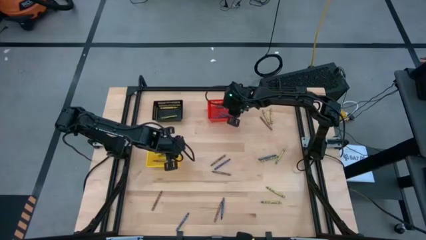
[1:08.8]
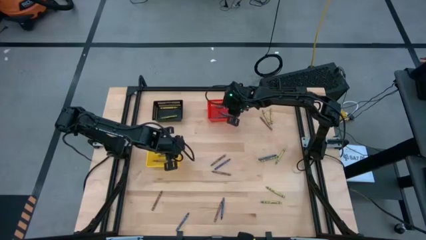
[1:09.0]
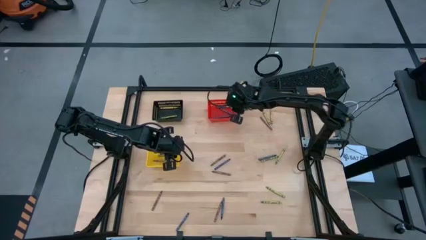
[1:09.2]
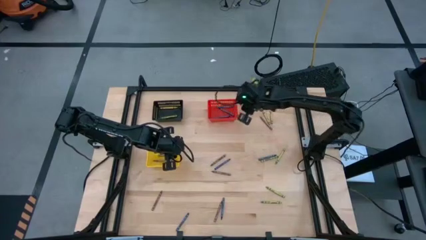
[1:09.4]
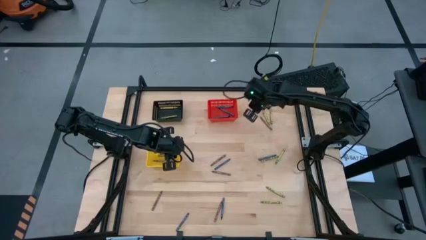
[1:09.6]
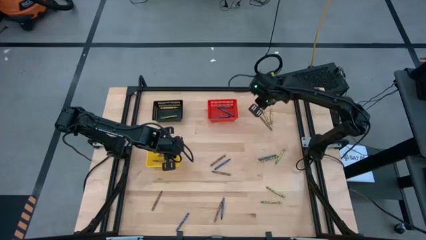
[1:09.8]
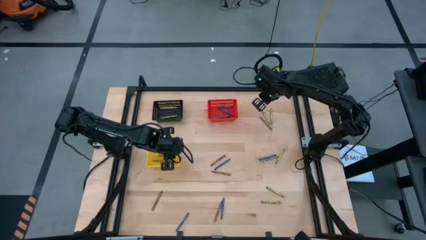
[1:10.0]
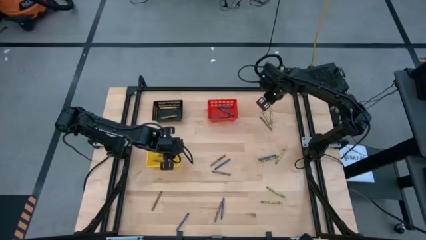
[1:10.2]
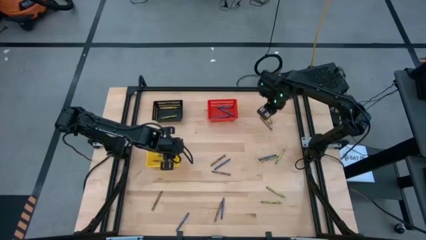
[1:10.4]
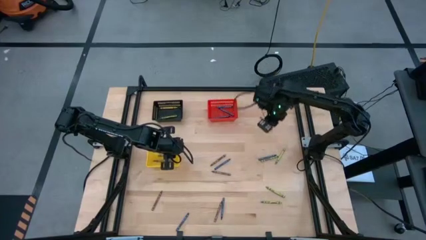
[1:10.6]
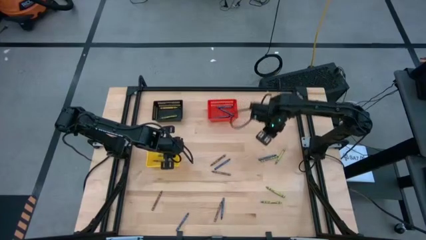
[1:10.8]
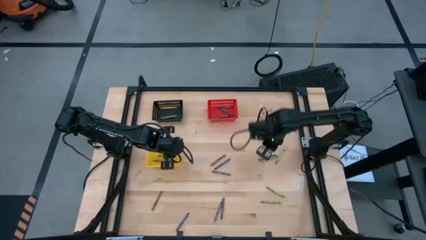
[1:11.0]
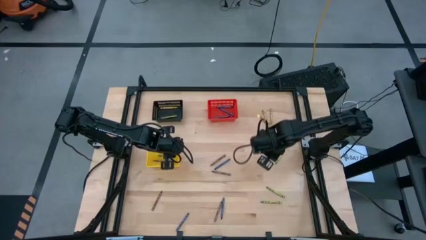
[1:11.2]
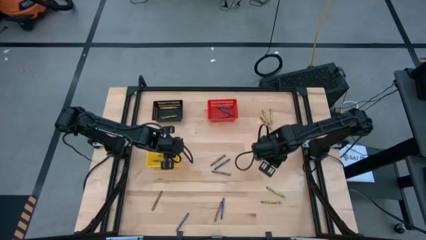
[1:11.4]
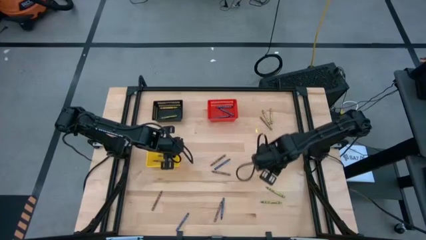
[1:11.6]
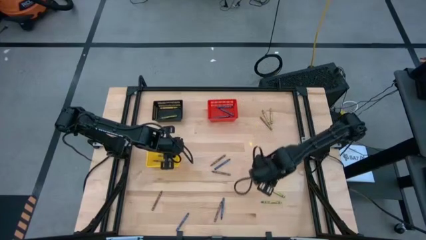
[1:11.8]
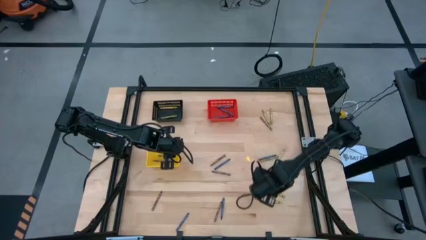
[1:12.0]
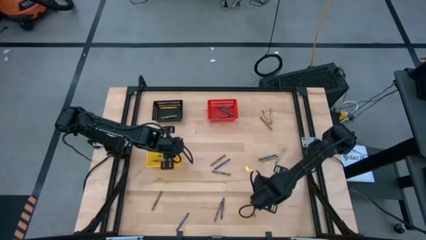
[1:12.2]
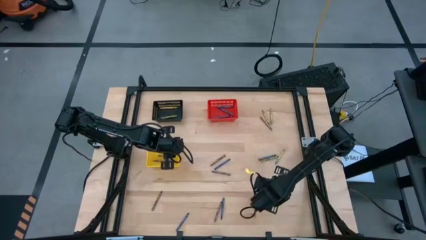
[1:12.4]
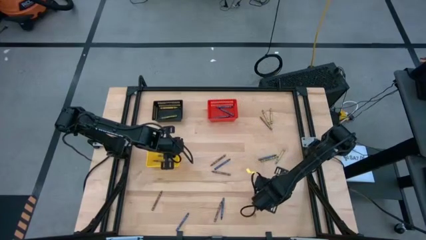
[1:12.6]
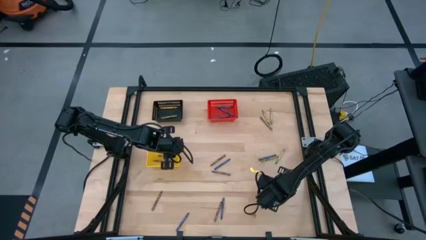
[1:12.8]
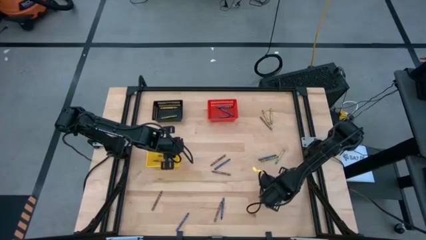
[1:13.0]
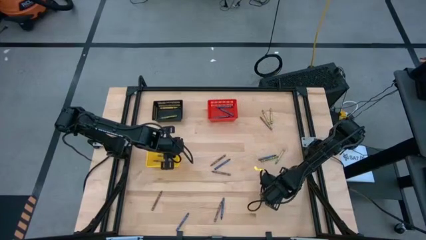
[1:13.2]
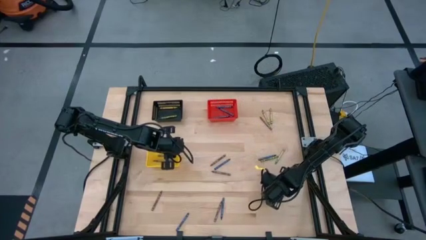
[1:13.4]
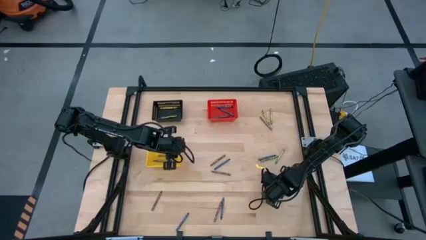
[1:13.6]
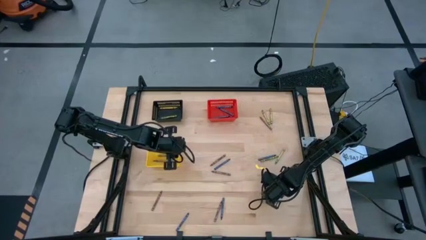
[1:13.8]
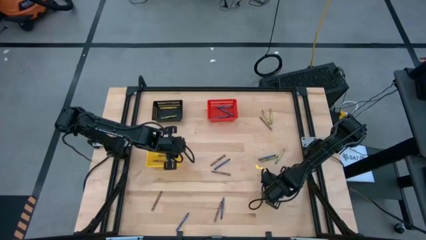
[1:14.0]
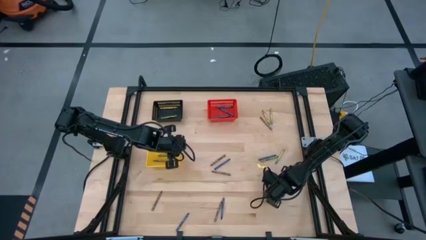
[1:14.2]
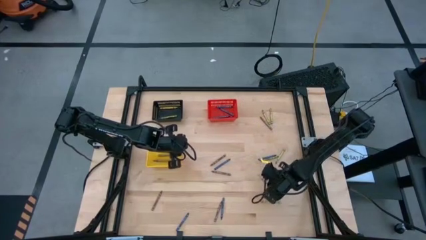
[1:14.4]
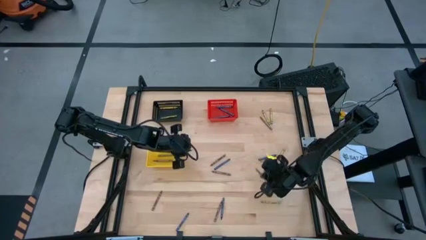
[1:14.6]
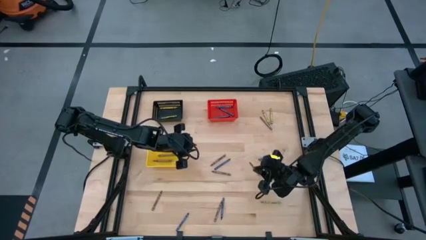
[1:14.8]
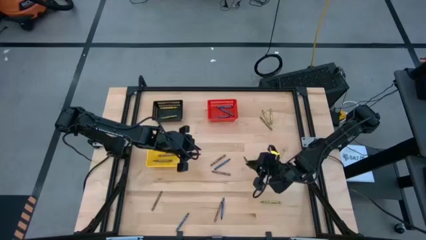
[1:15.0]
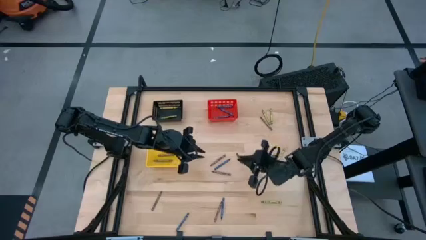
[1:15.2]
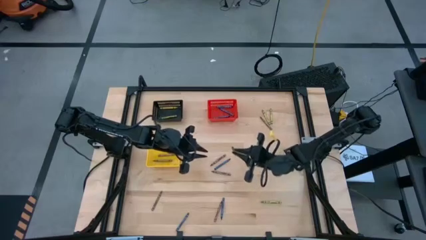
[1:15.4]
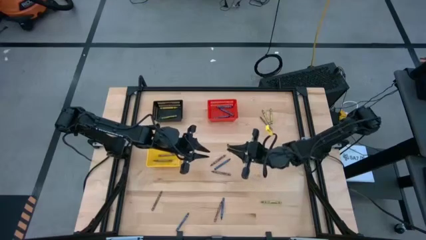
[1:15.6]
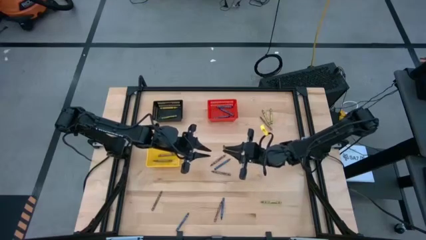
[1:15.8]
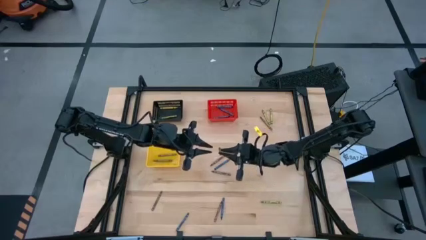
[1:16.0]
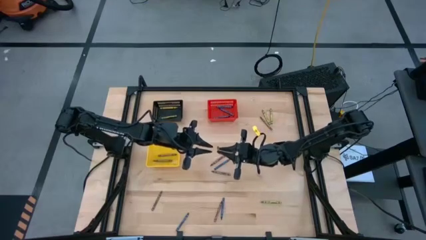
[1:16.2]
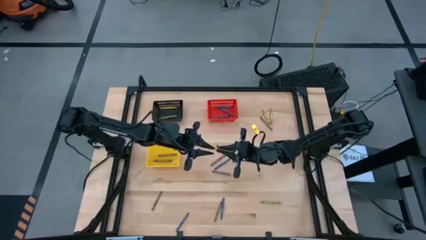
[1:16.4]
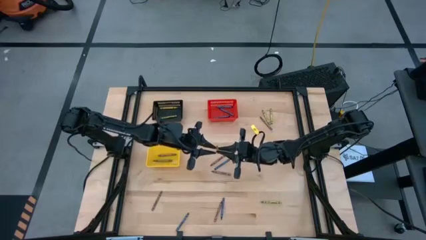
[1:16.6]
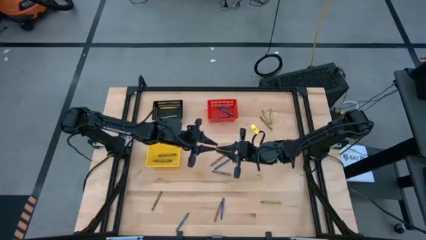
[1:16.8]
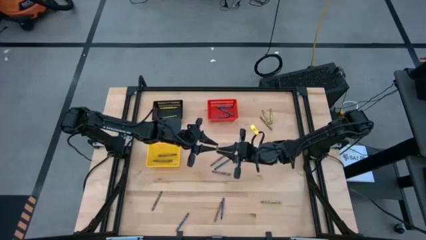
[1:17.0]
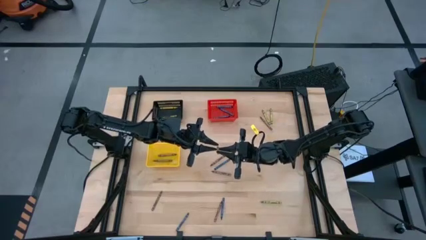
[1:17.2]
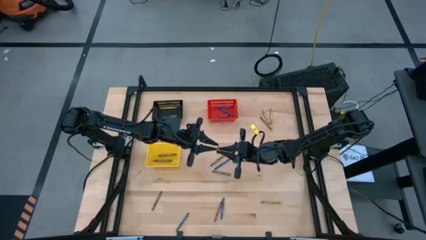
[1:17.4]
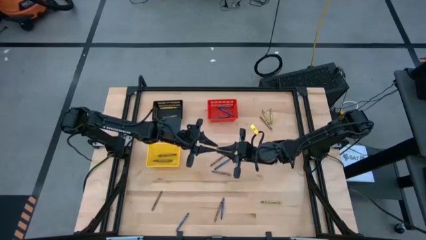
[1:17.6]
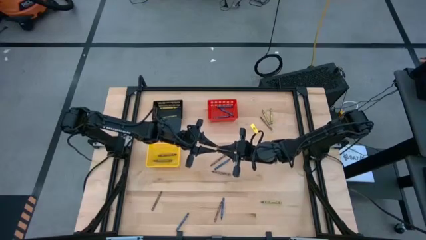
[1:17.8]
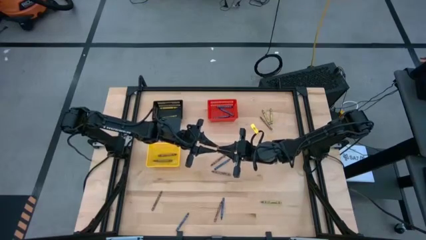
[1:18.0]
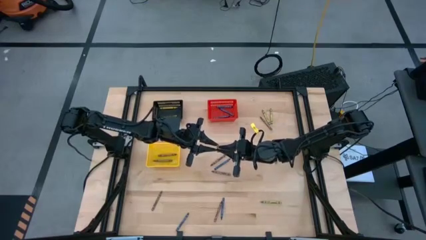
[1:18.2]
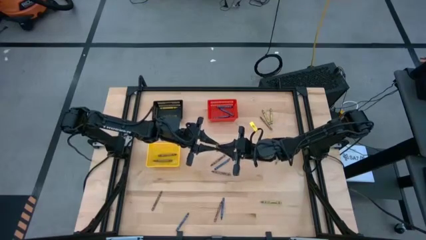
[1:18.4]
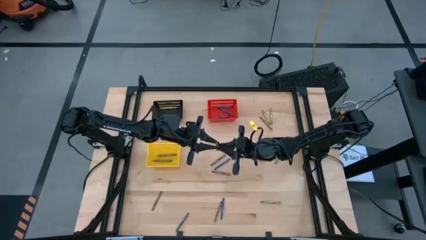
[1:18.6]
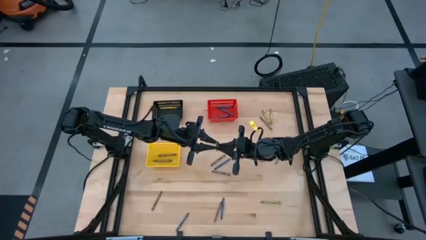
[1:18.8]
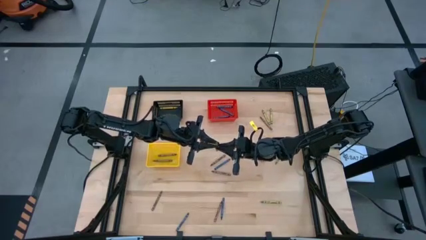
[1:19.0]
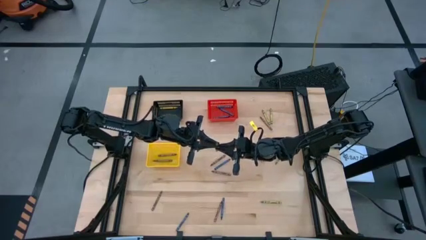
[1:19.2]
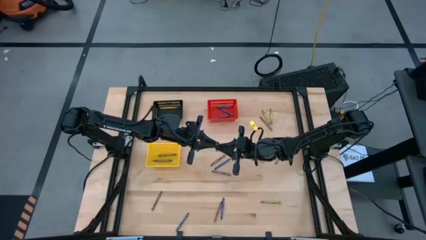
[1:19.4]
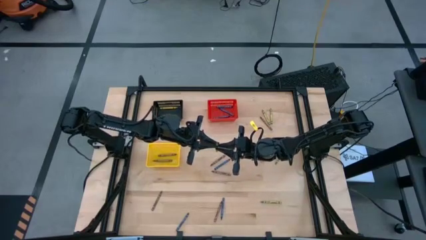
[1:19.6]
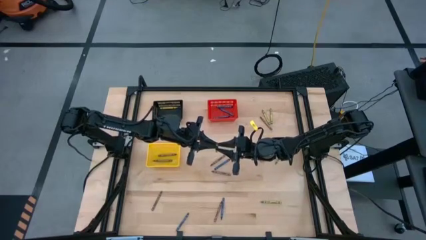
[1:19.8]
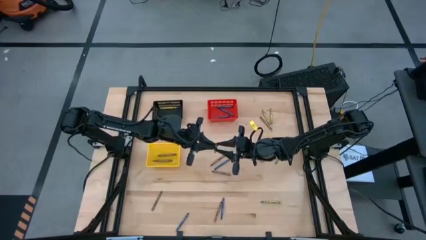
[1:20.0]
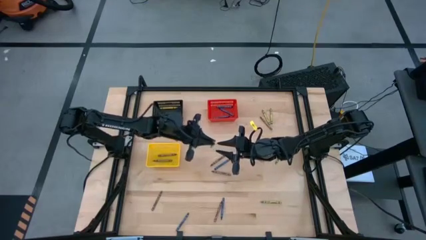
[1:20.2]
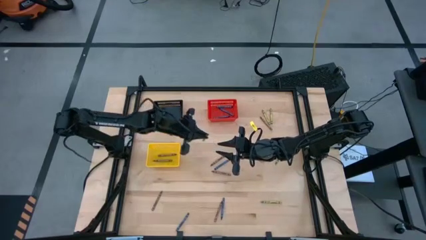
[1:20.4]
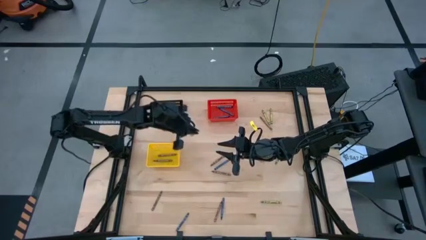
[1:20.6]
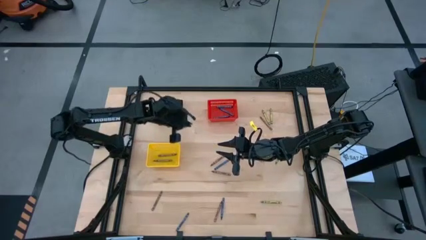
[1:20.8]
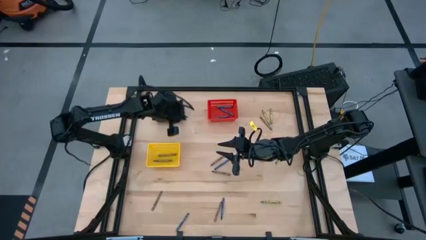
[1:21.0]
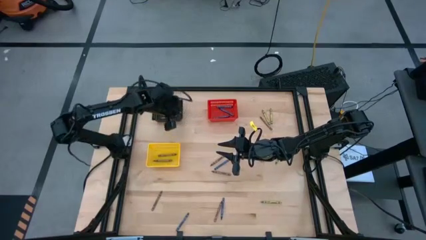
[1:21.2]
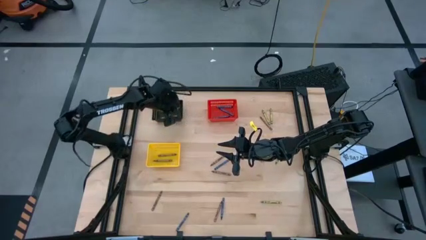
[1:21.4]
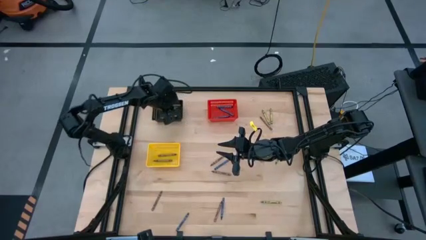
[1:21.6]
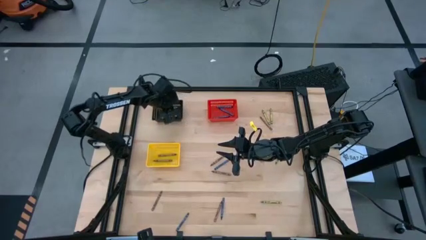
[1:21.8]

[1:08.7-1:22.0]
Task: Sort crayons
Put the green crayon into the black basket
